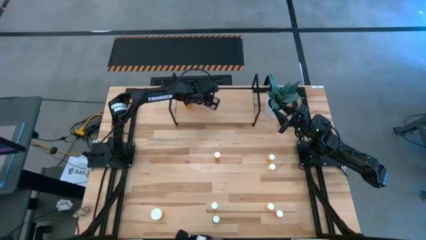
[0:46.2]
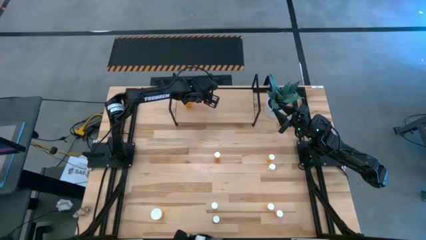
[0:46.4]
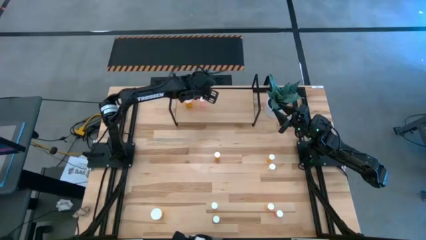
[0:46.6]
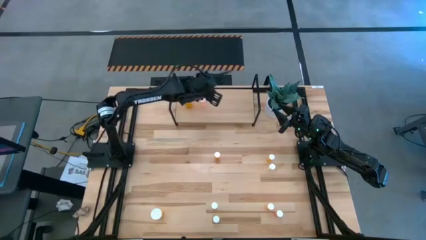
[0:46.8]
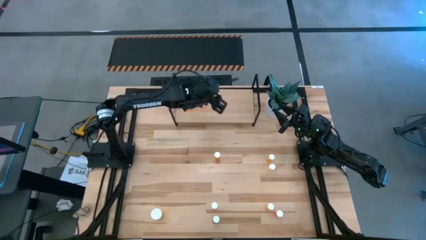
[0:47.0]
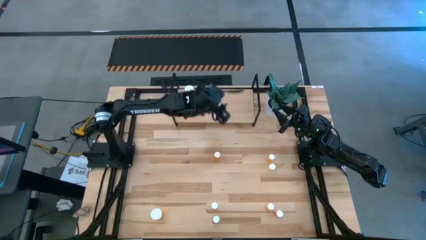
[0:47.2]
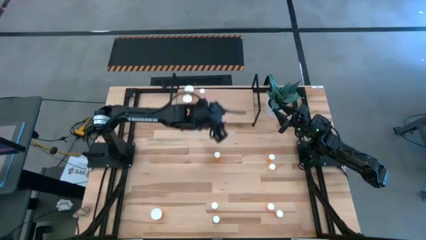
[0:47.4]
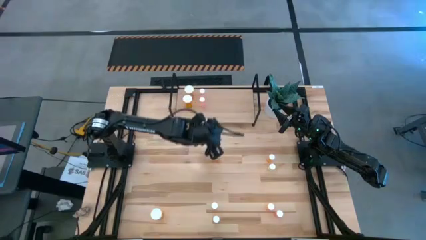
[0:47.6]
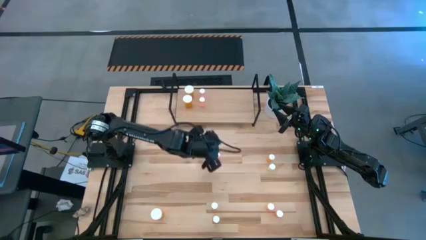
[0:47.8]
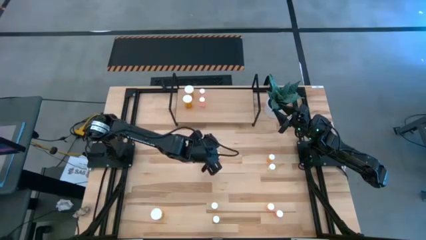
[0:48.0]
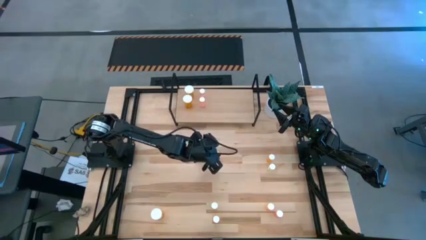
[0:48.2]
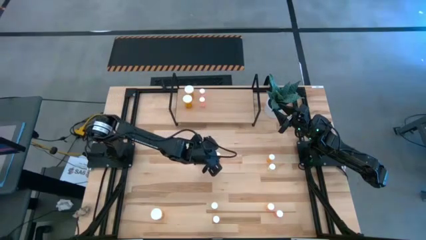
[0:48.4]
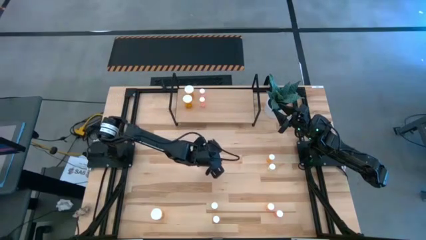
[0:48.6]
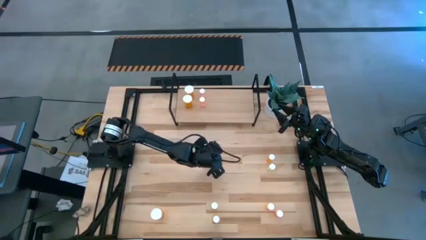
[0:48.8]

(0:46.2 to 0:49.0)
Task: Pick and place medicine bottles onto shelf by color
Put the top left small orange pill bottle on the shelf

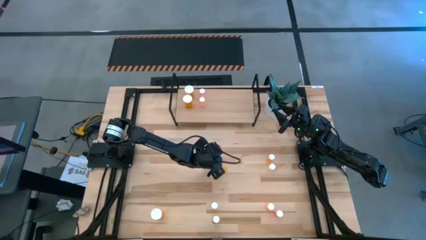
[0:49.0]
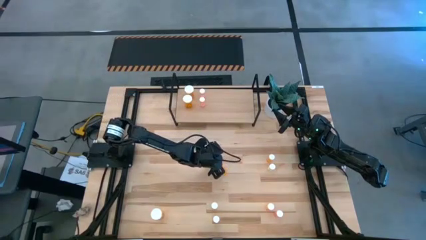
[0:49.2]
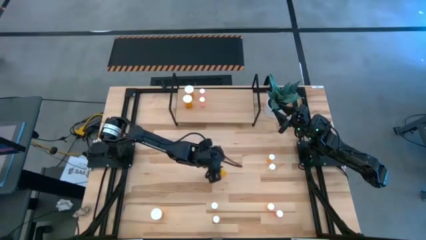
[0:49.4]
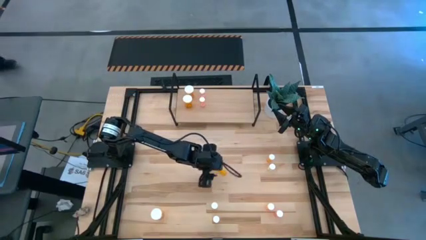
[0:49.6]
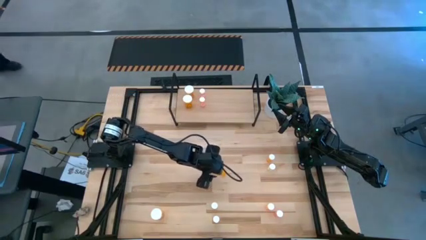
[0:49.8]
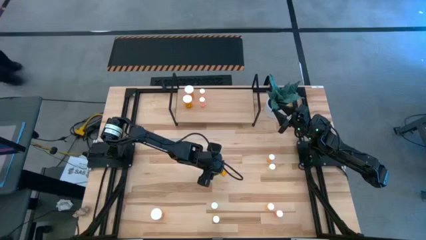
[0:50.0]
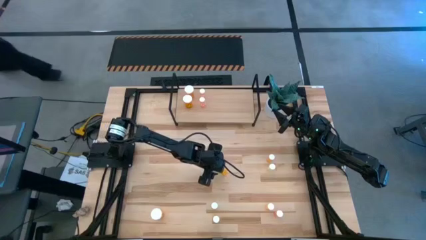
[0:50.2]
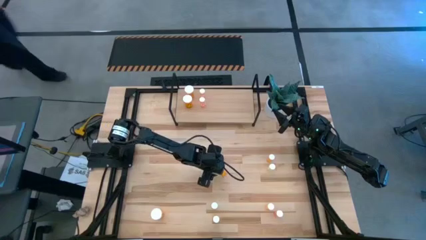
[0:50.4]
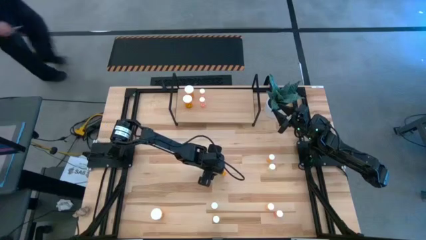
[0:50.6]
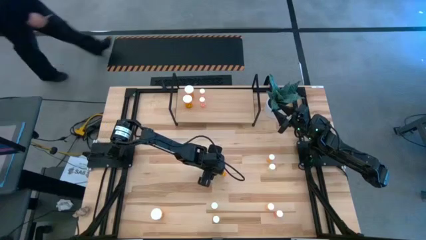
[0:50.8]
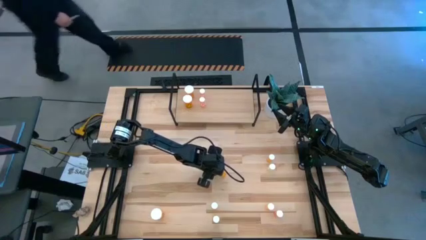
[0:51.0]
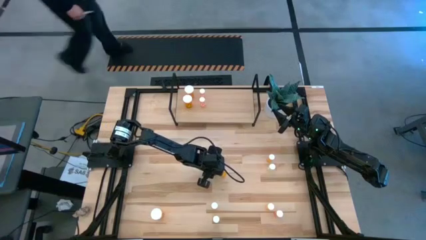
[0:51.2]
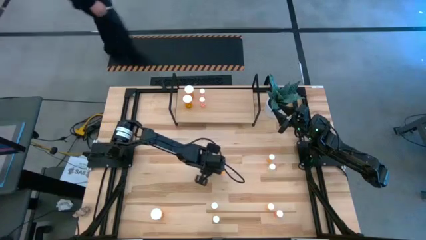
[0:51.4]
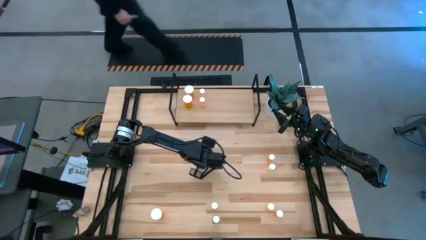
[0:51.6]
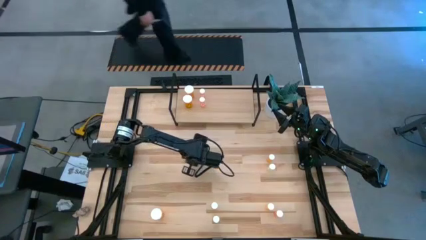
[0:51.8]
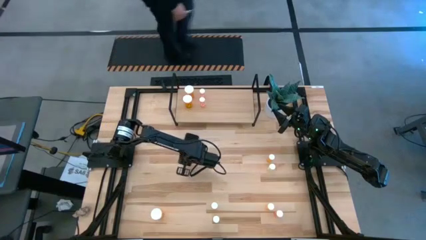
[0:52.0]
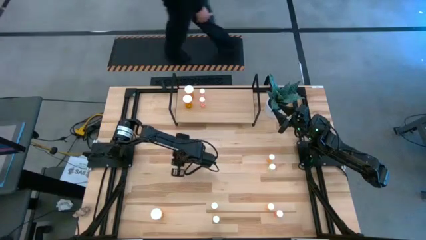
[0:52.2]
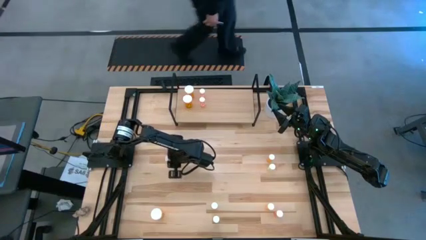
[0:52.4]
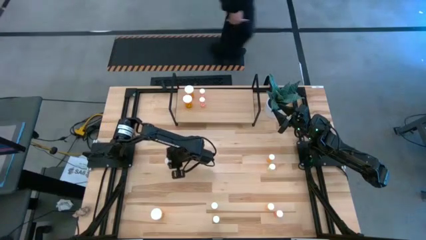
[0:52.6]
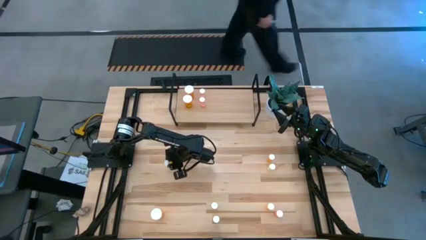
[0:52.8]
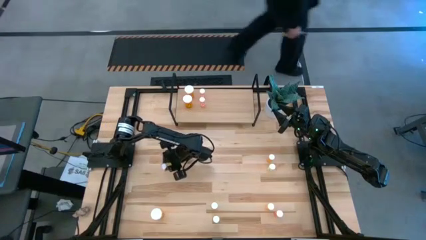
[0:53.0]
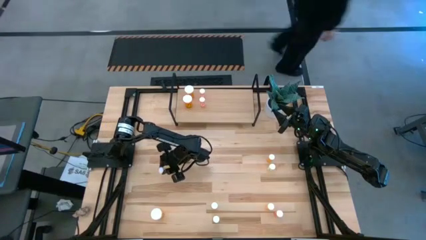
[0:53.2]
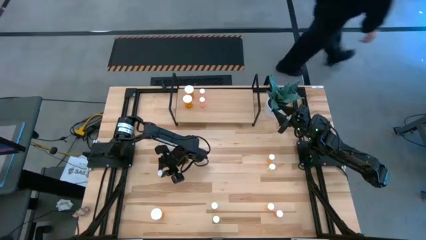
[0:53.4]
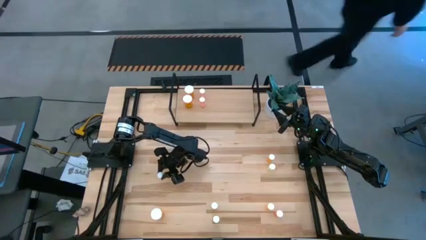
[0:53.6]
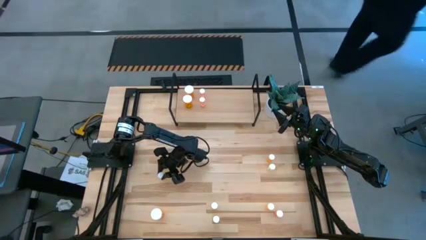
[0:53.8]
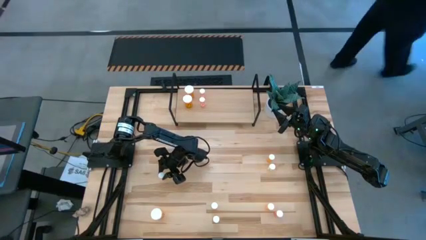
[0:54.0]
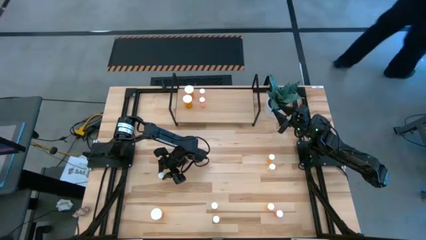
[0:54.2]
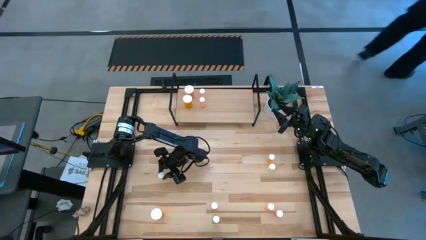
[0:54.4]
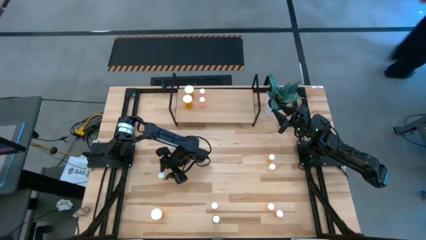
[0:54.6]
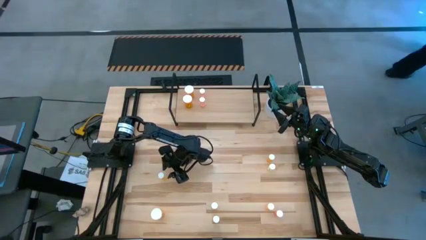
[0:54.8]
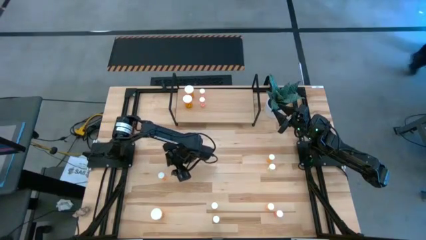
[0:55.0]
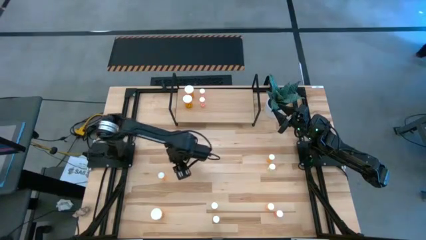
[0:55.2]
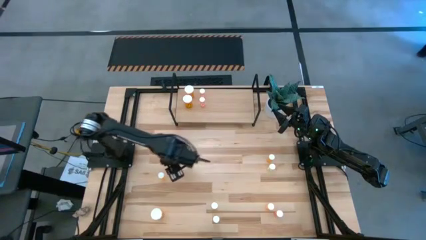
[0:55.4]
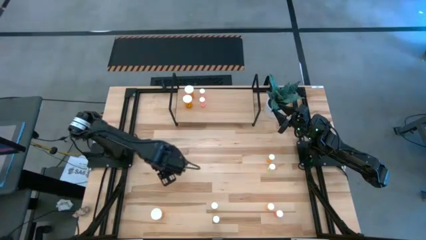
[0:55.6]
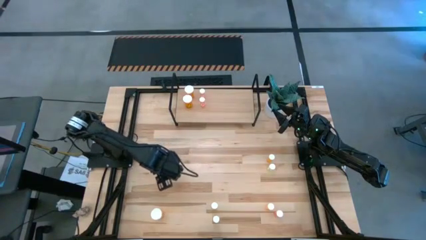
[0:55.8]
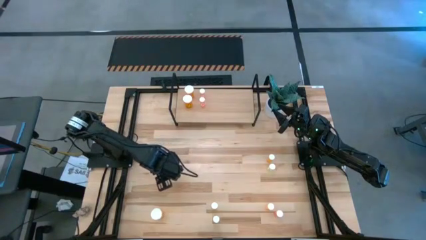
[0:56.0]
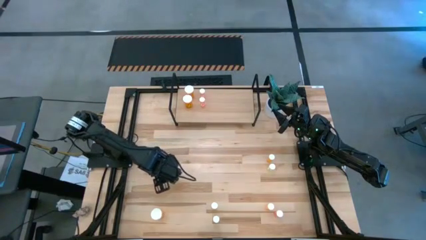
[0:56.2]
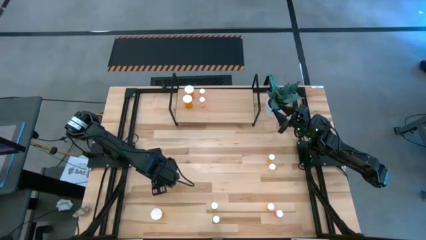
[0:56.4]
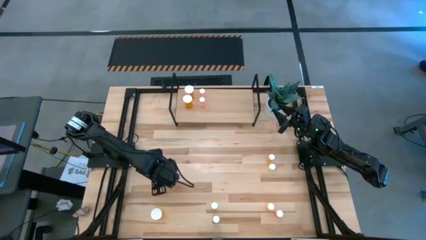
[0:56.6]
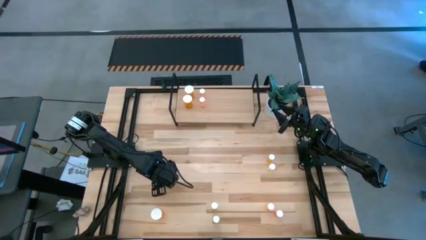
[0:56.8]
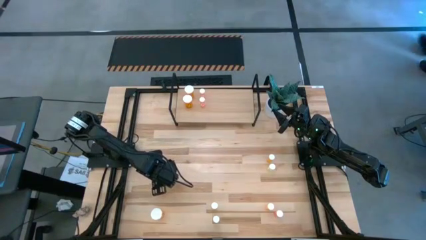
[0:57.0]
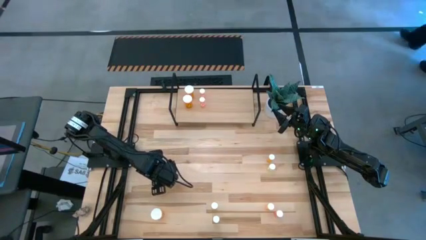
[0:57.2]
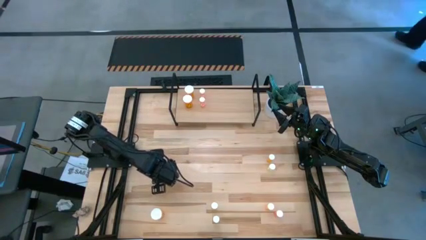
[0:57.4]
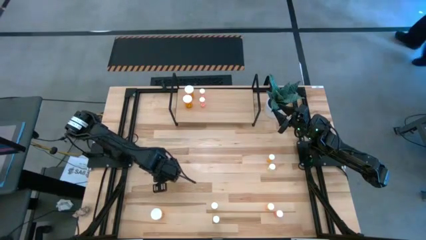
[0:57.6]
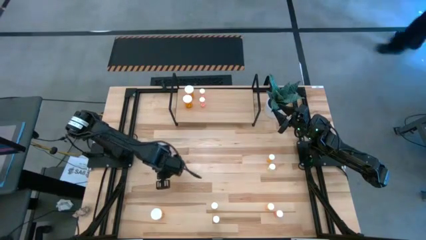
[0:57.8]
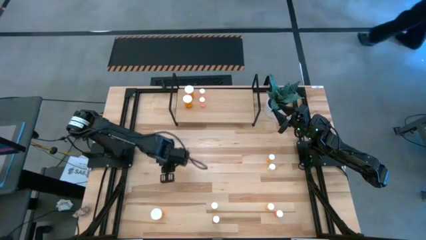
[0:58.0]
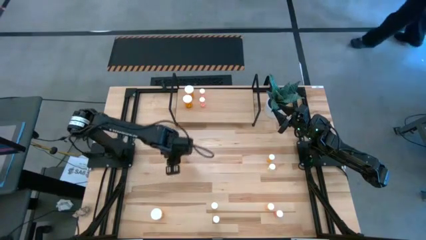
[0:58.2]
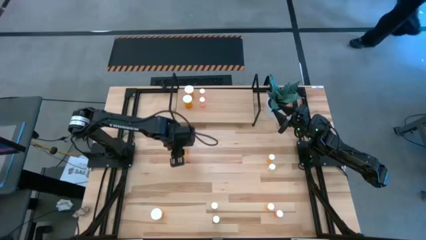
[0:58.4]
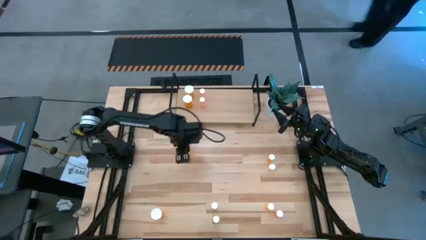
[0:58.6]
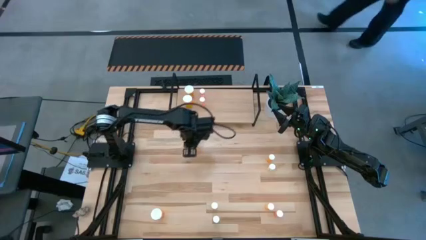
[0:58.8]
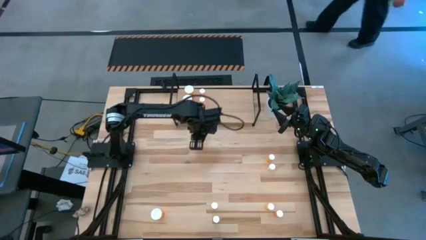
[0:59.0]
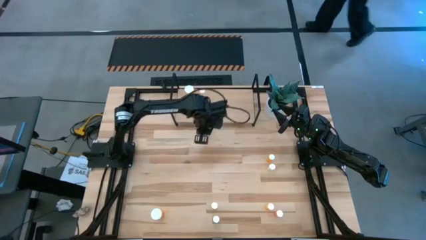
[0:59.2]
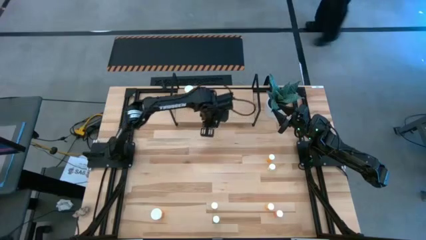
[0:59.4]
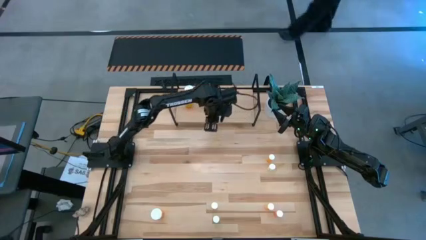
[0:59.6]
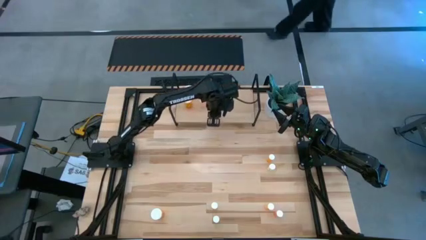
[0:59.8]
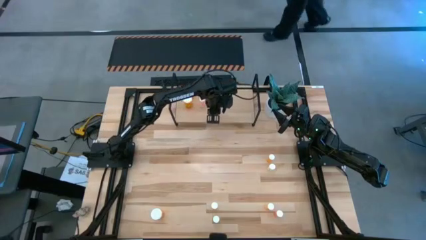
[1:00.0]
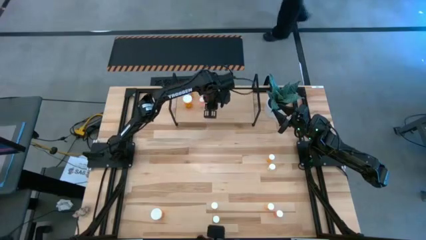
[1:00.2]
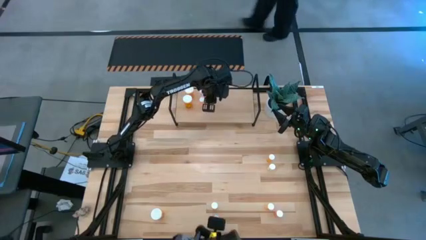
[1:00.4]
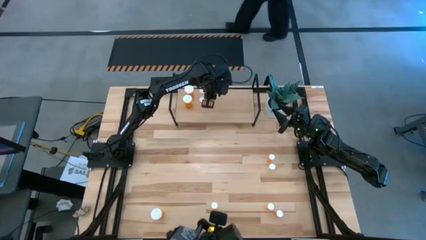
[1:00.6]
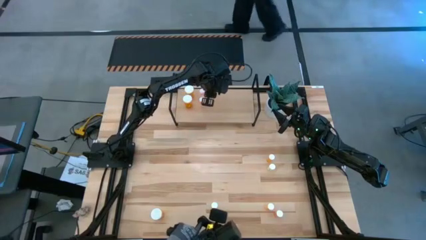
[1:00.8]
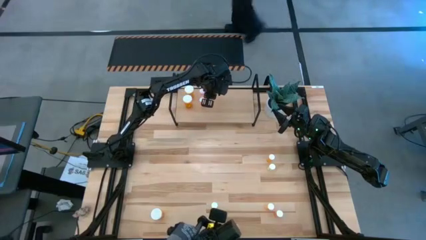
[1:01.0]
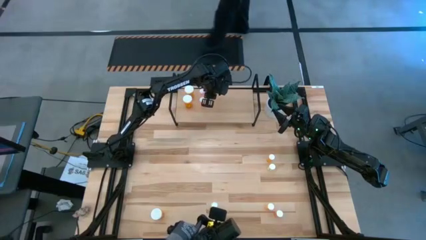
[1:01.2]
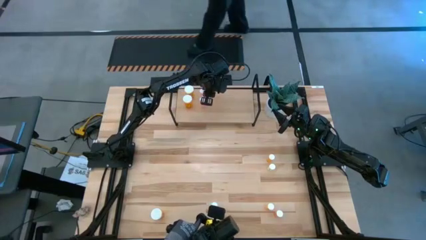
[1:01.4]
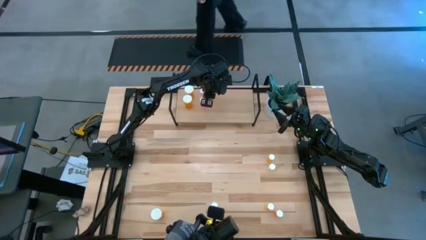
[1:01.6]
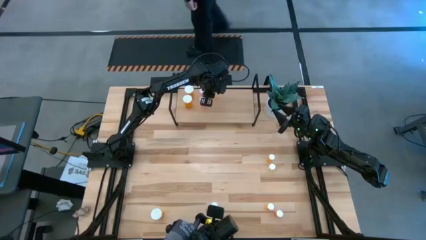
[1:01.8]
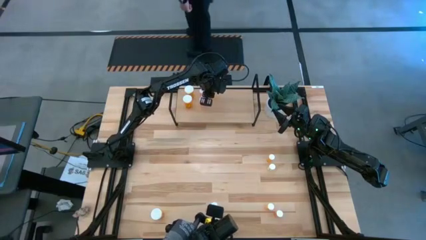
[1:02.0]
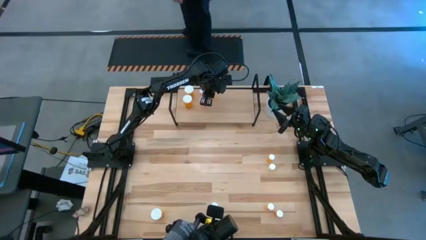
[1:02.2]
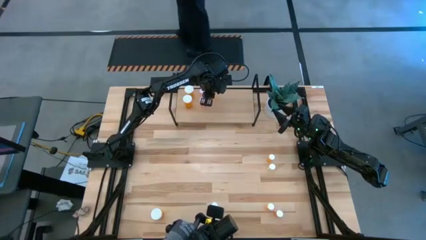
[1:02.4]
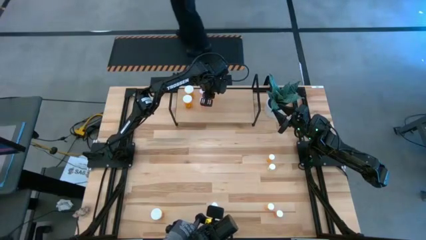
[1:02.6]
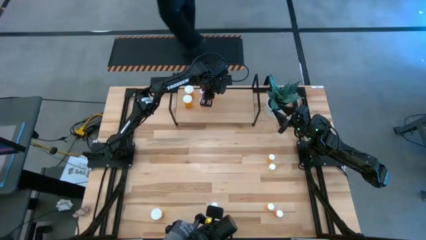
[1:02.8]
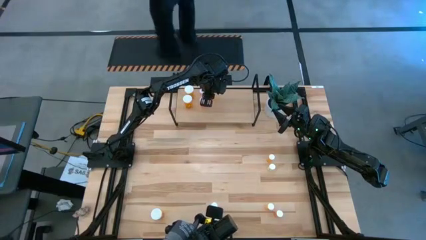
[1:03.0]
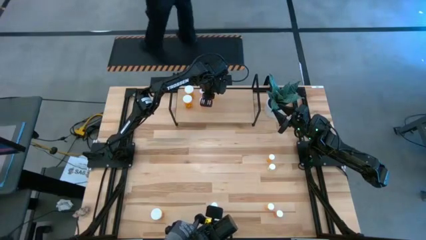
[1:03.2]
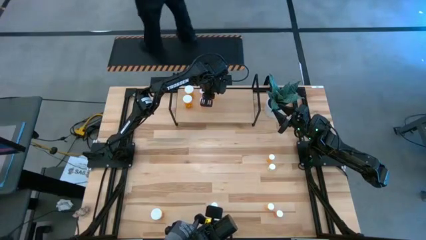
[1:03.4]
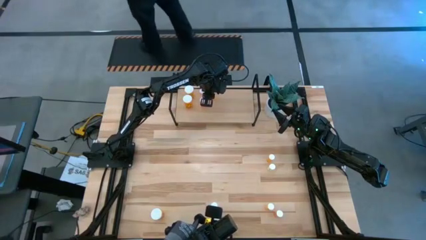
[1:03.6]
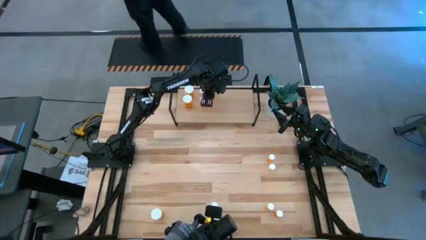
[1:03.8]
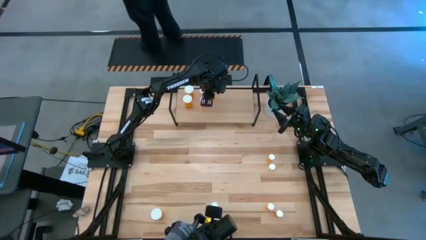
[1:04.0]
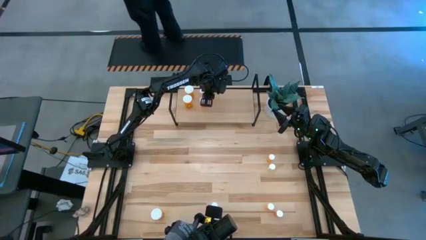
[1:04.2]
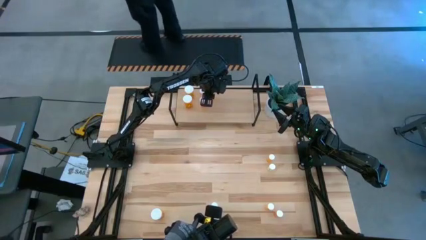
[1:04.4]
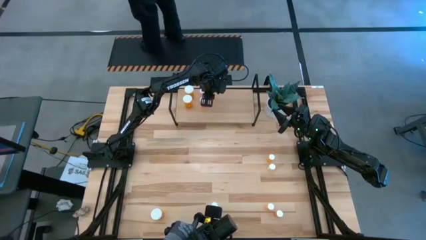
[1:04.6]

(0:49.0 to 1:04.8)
Put the top left small orange pill bottle on the shelf
